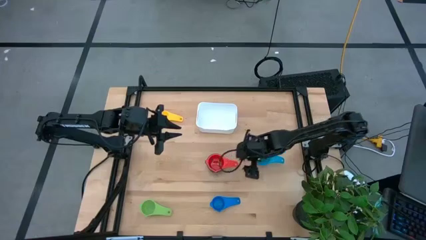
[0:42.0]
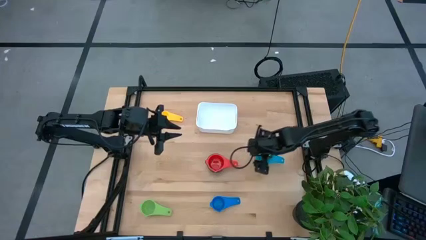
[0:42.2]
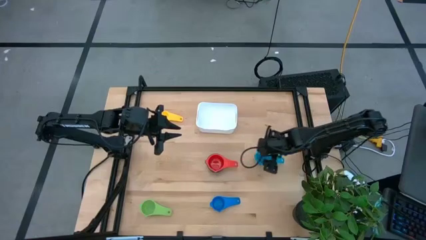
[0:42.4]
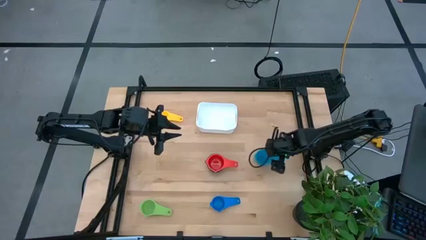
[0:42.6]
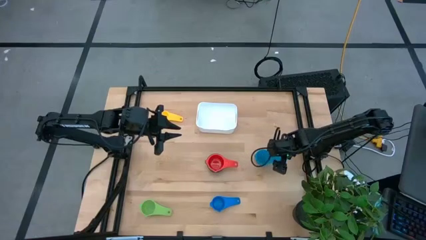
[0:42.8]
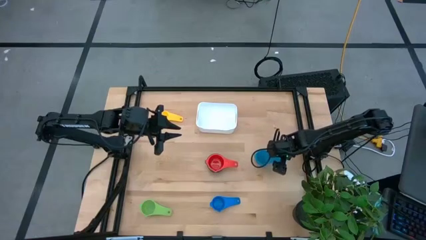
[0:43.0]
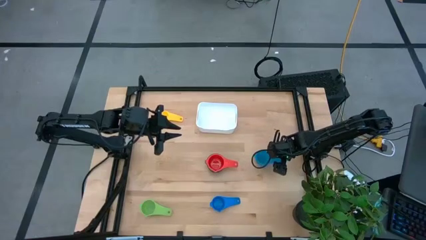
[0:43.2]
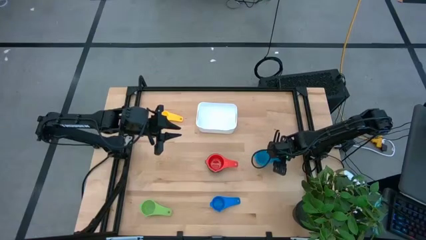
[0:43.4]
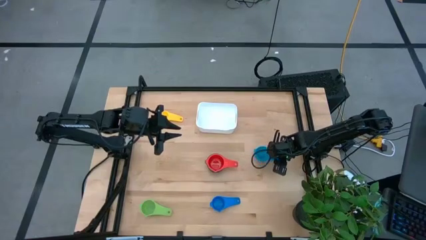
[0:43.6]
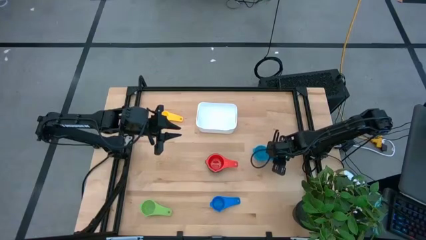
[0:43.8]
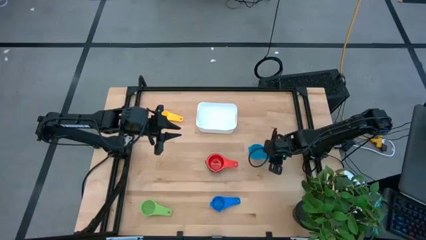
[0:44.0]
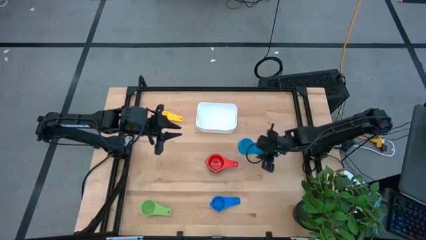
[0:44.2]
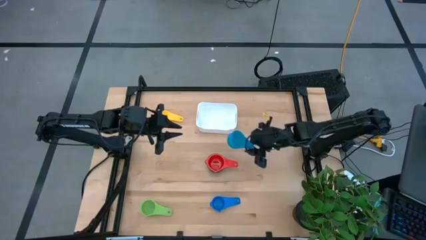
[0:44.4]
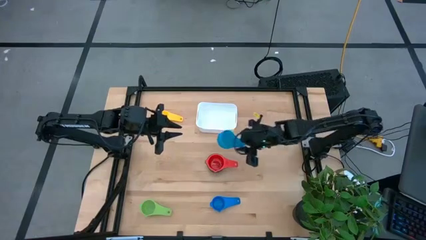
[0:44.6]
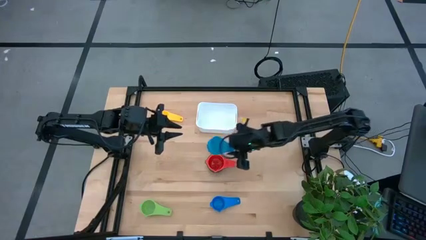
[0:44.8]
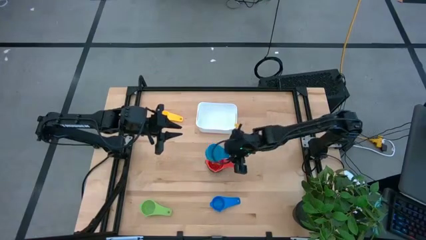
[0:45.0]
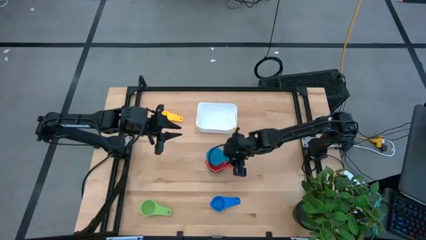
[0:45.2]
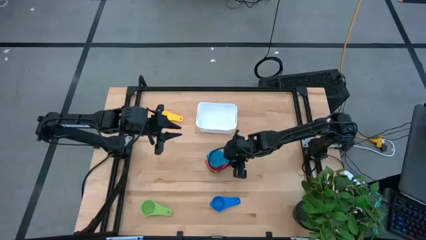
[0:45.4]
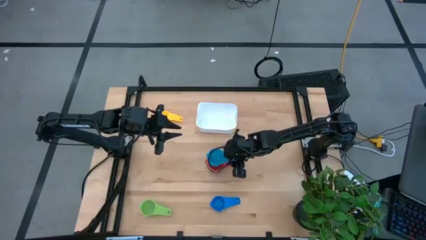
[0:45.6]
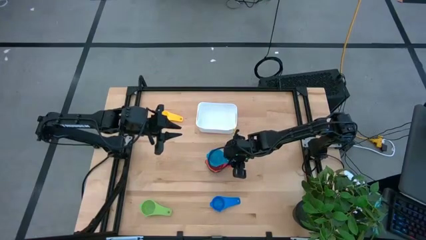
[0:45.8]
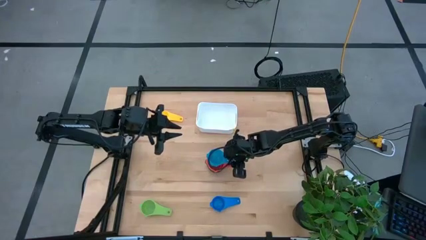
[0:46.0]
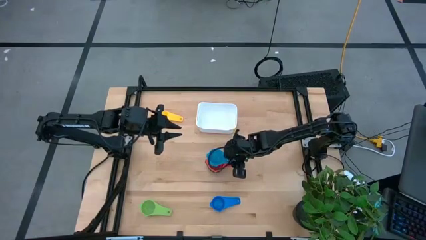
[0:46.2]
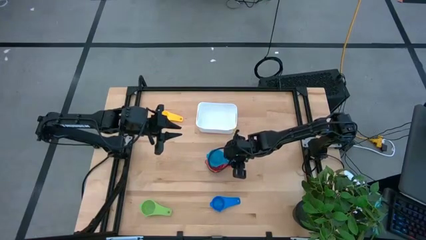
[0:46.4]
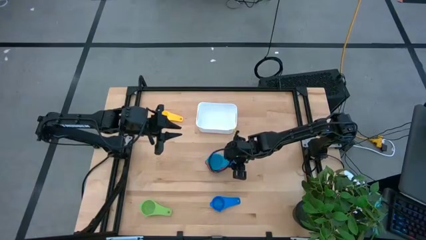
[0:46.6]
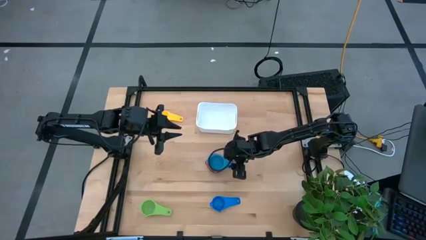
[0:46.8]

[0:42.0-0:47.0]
Task: Nest measuring cups in basket
Stack the light blue measuring cup on top of the red measuring cup

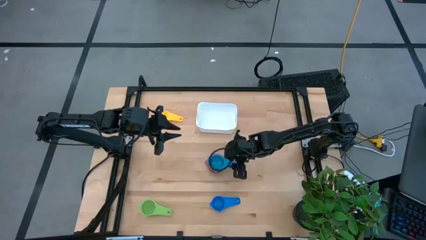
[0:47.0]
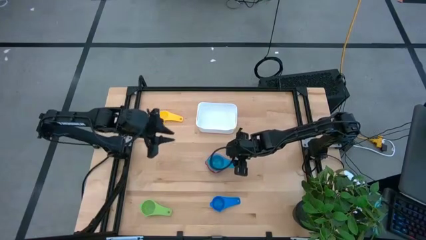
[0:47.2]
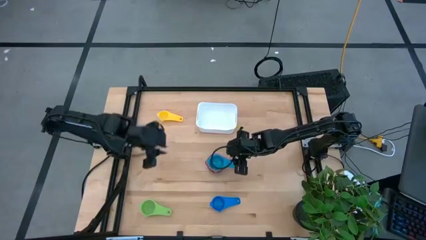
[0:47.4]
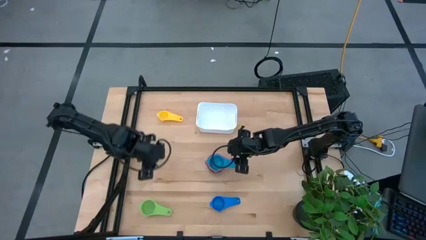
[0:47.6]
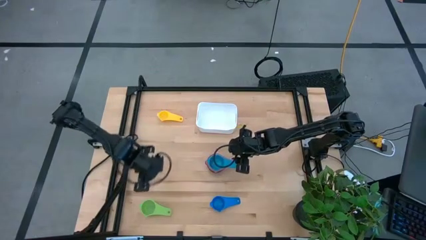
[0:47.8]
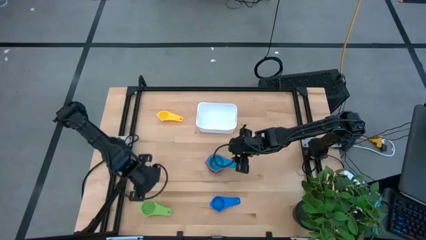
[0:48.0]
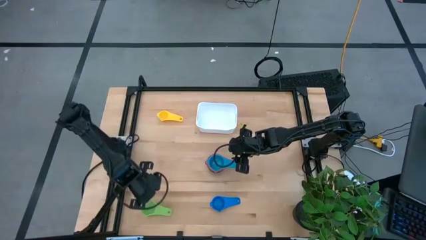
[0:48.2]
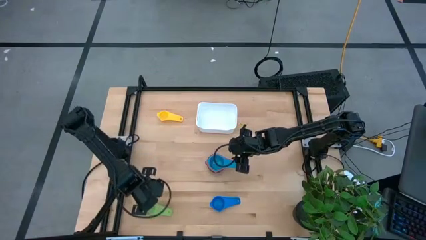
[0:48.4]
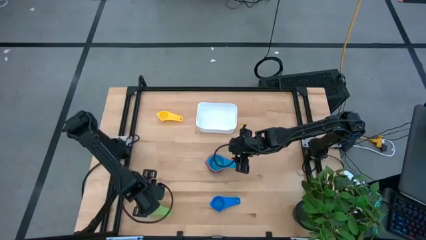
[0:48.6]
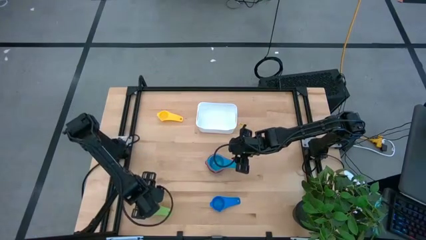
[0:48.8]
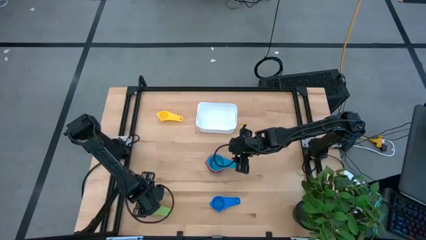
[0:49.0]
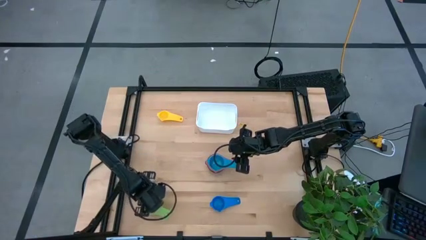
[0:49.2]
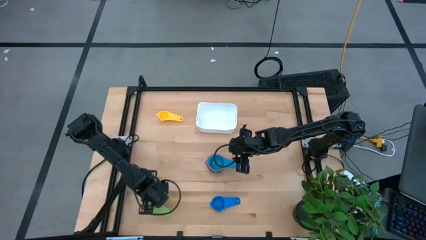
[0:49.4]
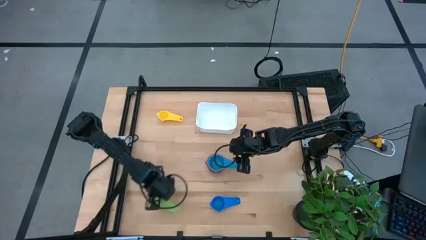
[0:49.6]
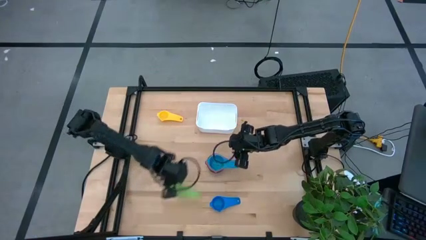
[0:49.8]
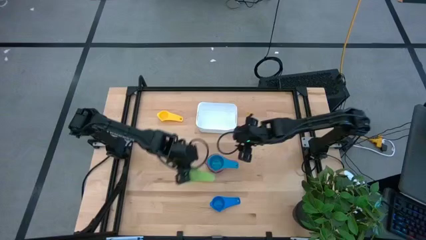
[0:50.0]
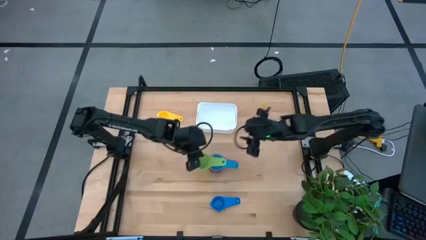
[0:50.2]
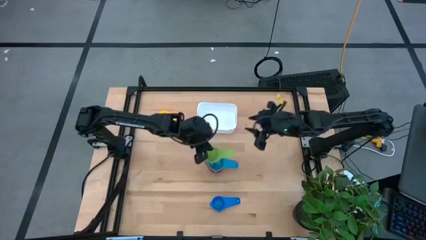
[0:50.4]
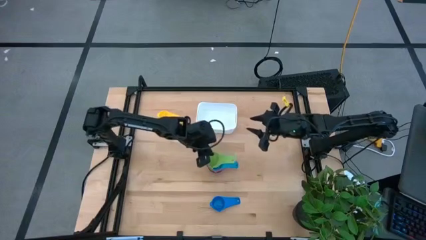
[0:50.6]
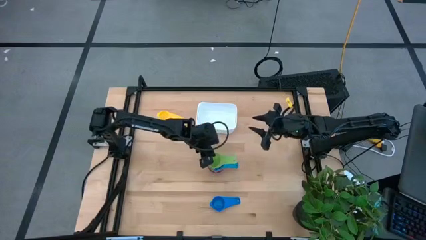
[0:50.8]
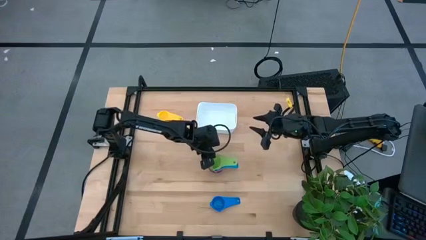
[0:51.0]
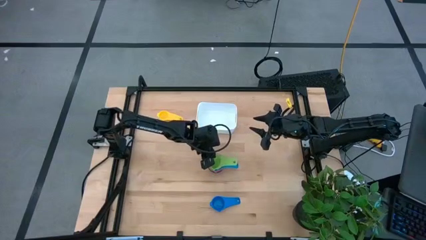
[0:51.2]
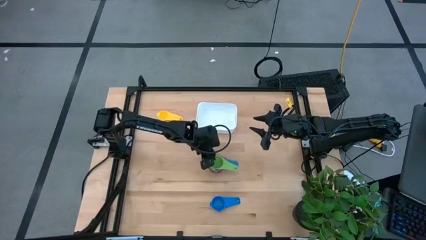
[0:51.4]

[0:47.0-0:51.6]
Stack the green measuring cup on top of the light blue measuring cup
